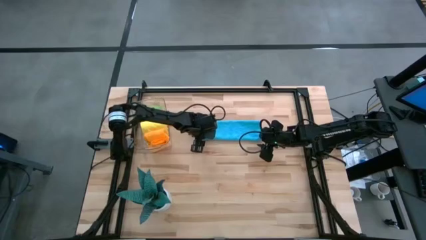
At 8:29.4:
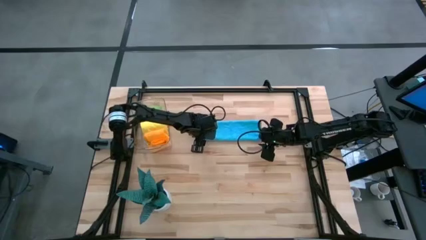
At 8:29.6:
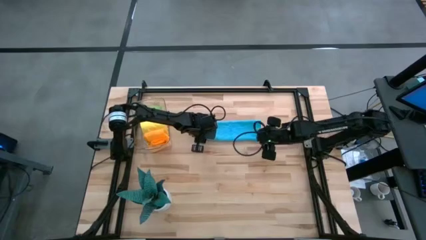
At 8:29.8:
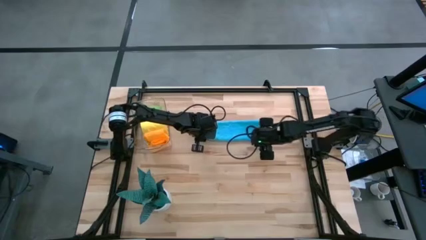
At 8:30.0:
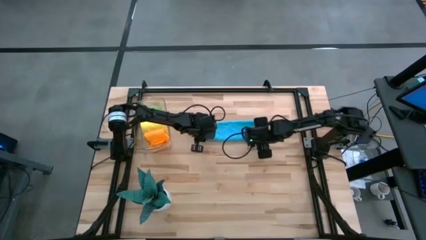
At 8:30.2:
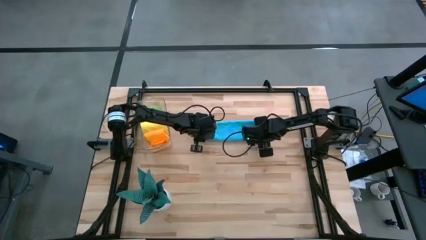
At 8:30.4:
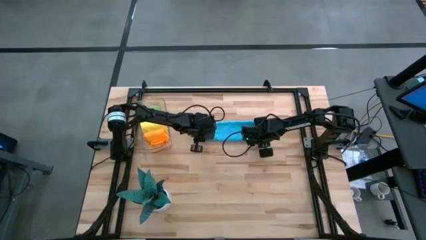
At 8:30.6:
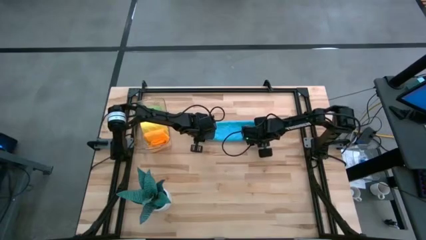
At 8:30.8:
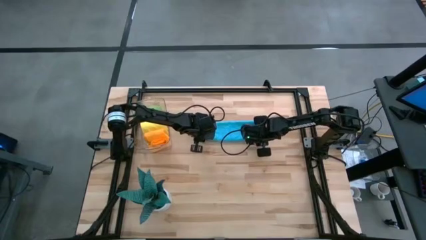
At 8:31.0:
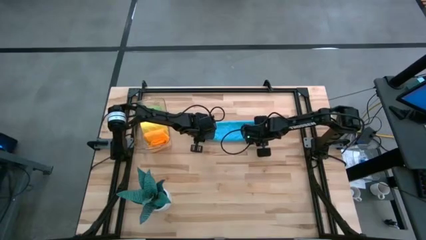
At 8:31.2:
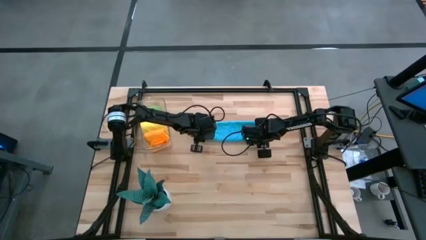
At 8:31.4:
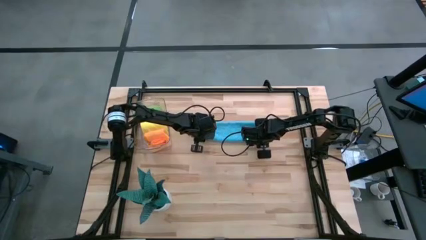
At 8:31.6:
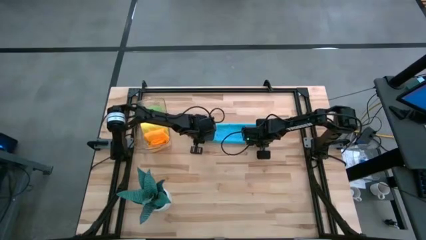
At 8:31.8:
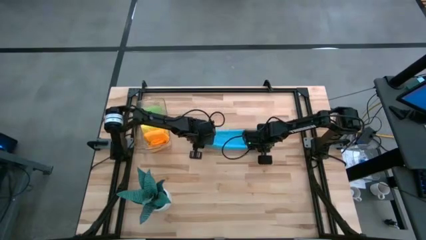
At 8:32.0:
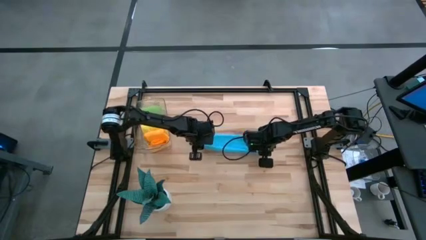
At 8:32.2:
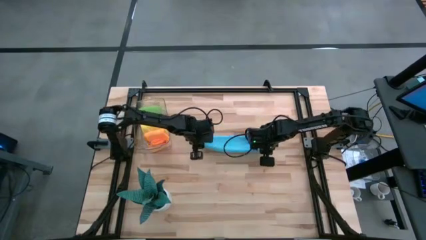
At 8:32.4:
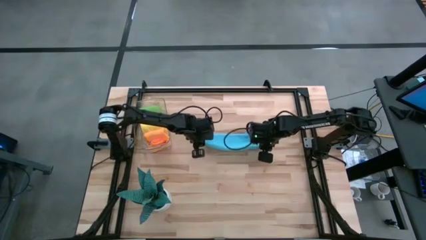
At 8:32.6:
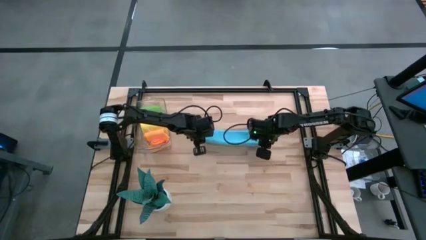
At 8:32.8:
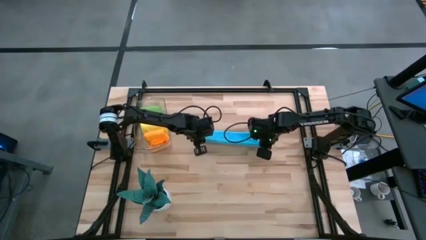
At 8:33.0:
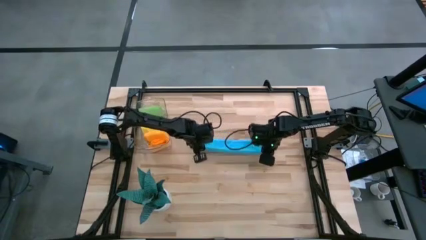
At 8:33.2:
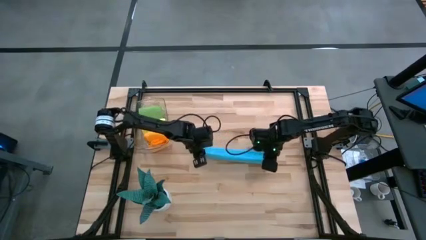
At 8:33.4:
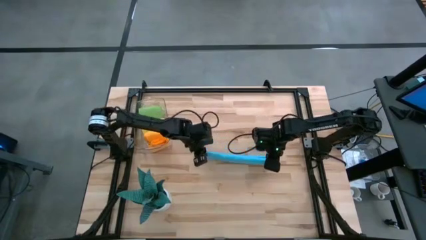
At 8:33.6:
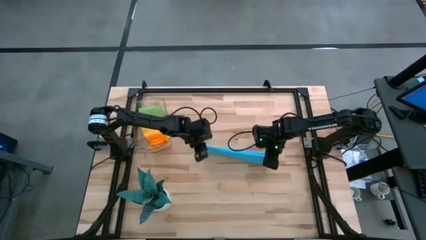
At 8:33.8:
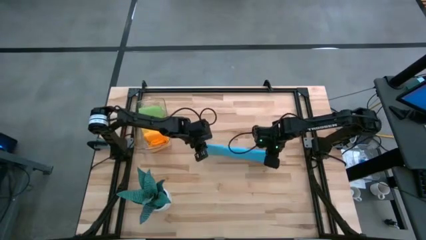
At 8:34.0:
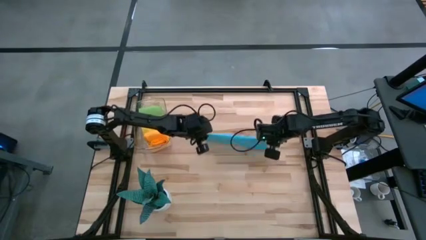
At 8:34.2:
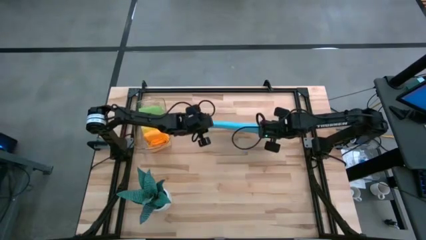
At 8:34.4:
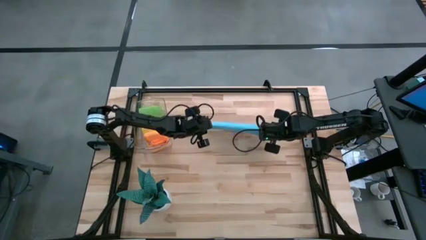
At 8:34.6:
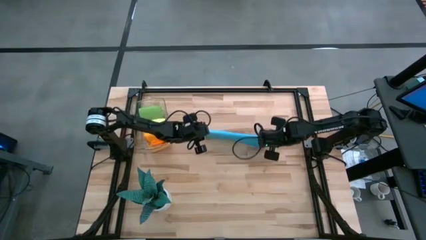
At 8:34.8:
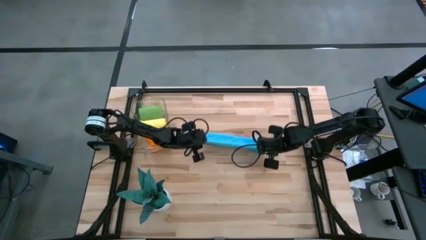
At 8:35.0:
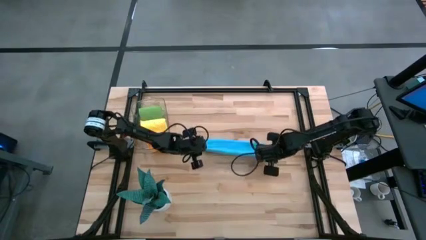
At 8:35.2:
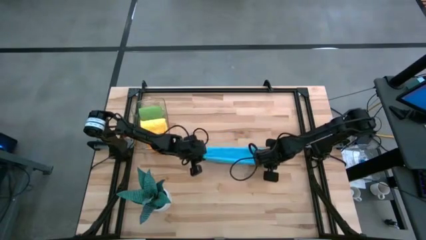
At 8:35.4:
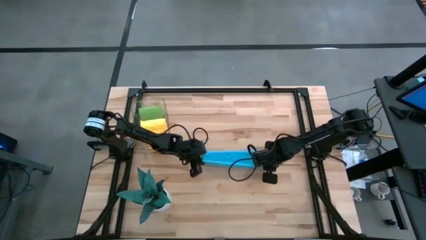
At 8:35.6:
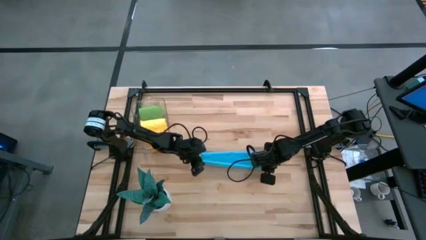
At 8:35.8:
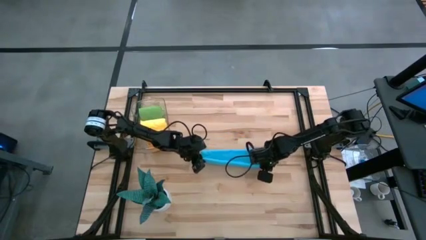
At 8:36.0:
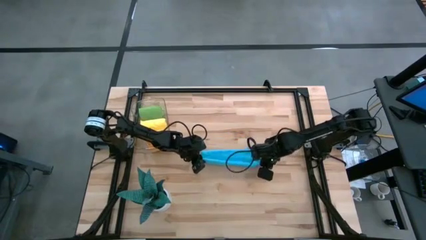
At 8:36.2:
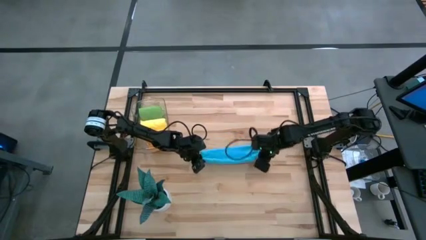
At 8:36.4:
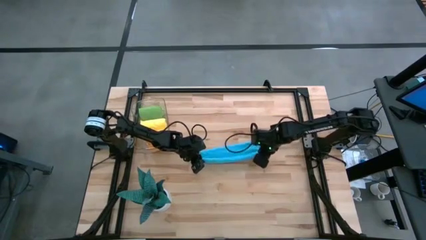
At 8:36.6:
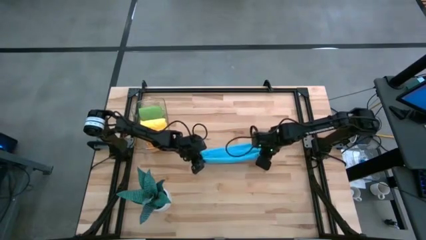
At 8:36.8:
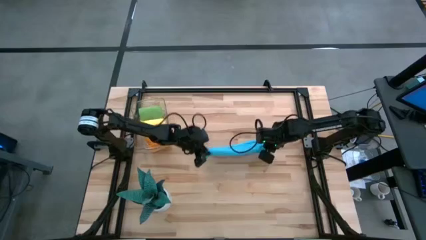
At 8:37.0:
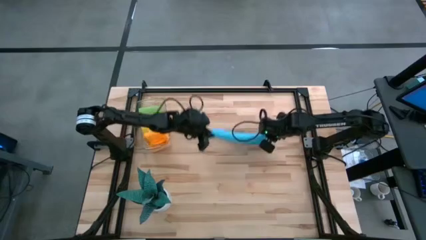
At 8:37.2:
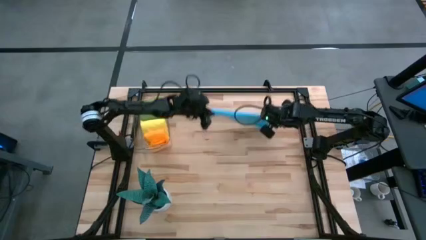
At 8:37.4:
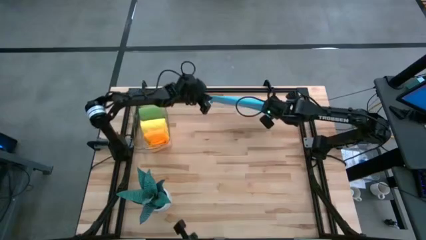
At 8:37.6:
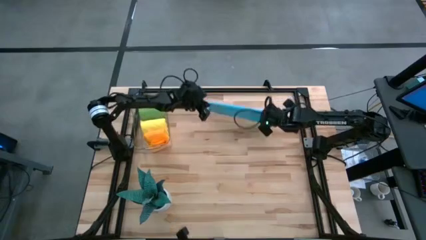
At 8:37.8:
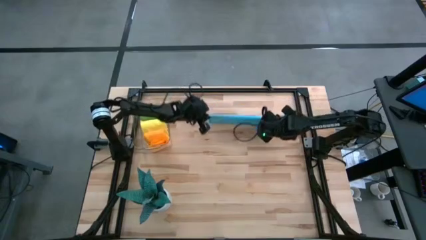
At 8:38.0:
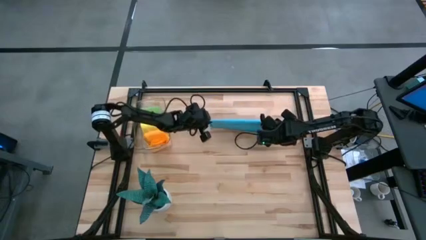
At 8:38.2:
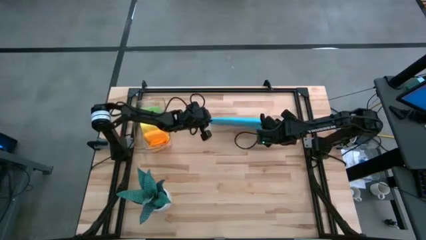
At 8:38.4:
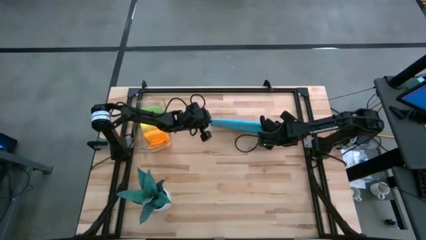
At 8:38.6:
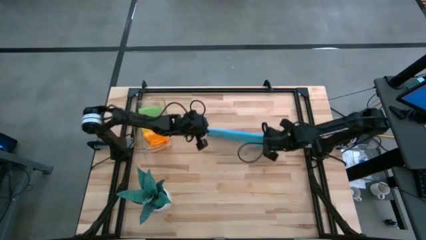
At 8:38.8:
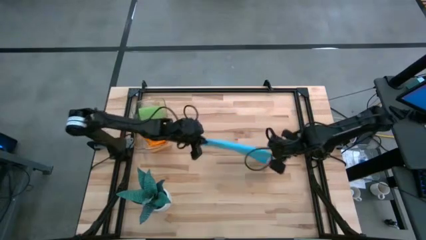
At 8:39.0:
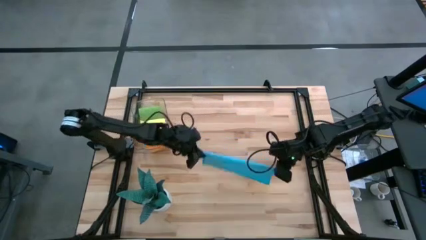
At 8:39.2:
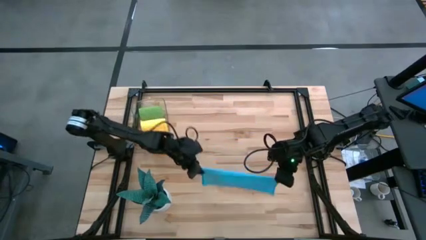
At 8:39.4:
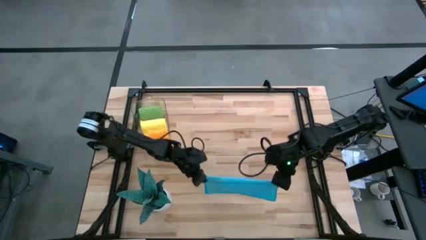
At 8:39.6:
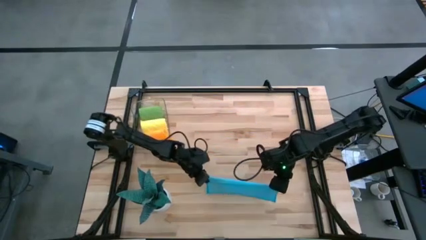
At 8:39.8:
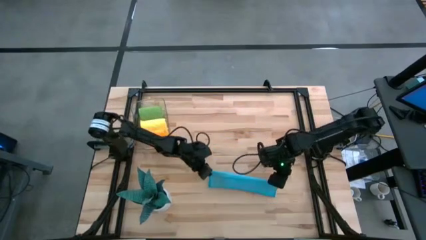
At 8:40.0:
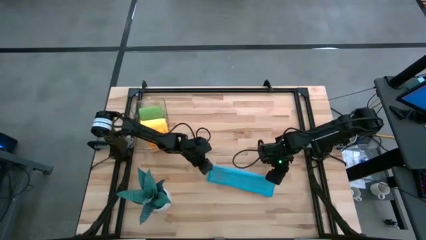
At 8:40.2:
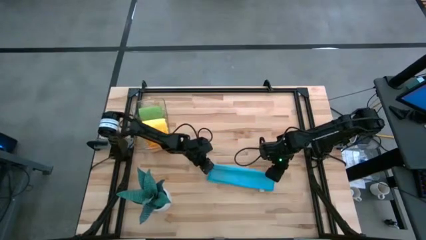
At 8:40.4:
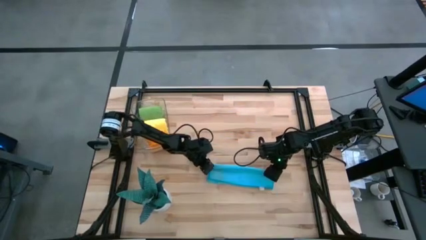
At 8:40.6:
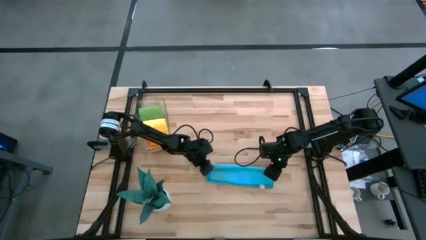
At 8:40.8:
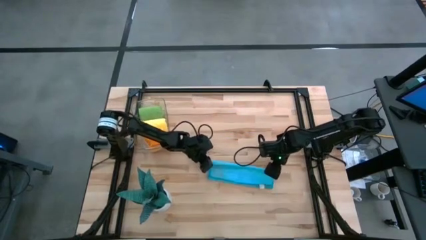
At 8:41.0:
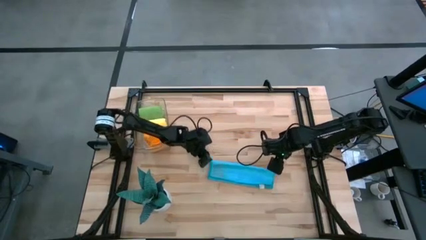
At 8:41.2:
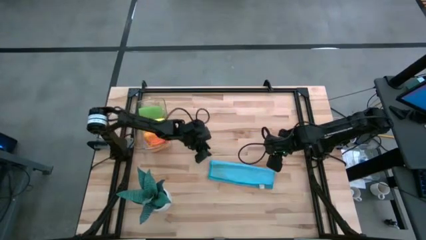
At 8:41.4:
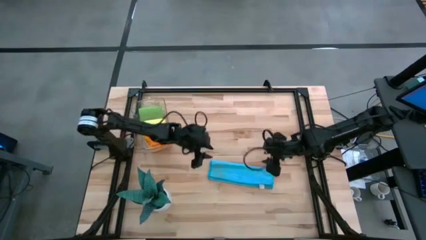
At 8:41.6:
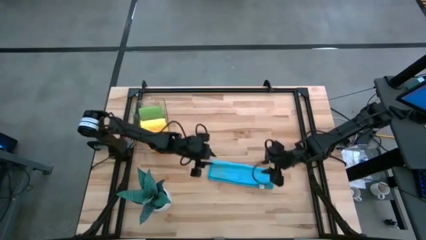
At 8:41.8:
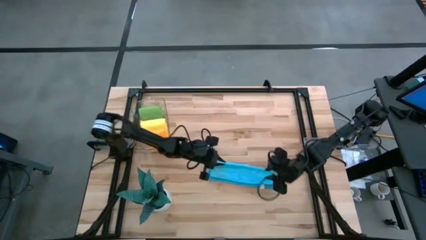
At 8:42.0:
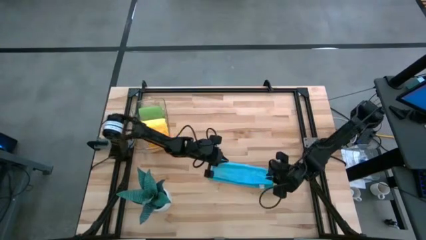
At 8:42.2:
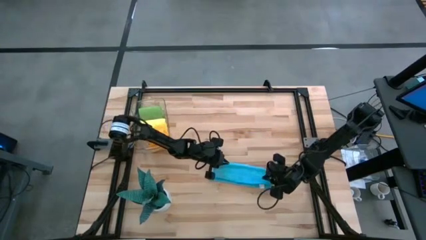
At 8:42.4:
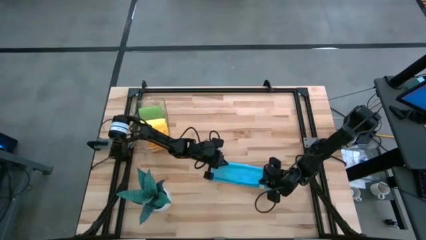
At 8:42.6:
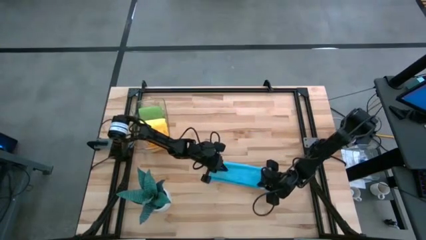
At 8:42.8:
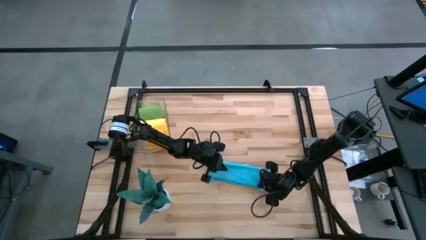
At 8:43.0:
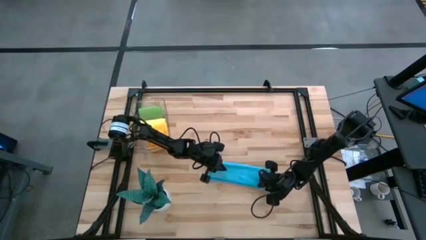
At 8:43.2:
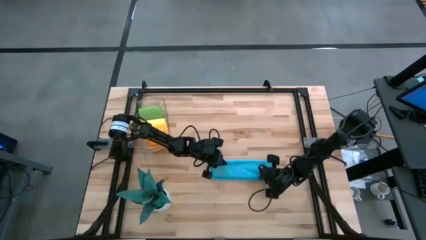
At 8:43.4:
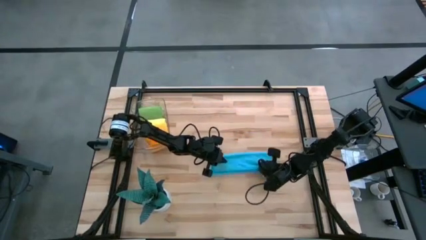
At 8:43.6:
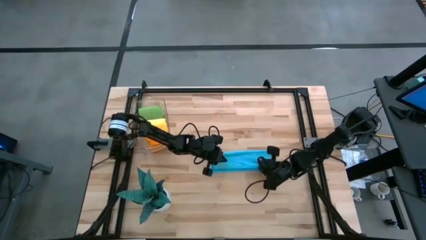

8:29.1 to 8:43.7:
Task: Roll microfiber towels into tight, uniform cylinder then place into a basket
Fold the blue microfiber towel

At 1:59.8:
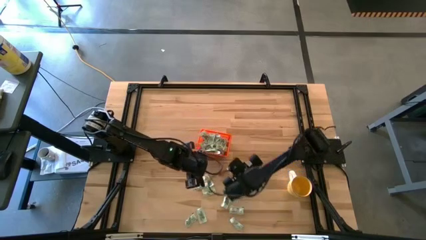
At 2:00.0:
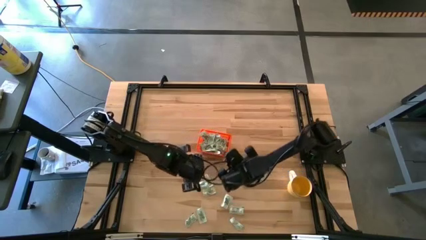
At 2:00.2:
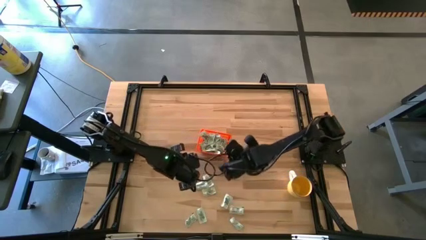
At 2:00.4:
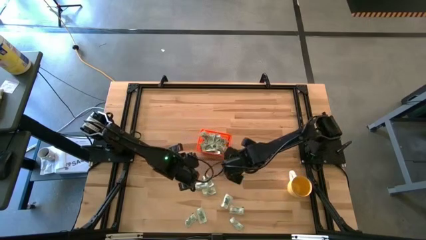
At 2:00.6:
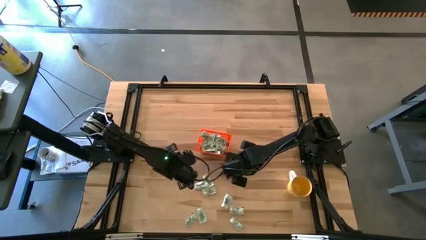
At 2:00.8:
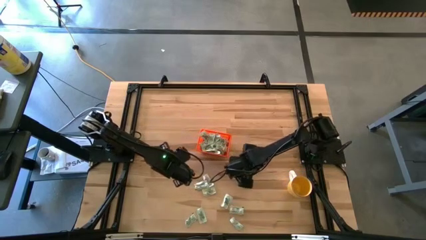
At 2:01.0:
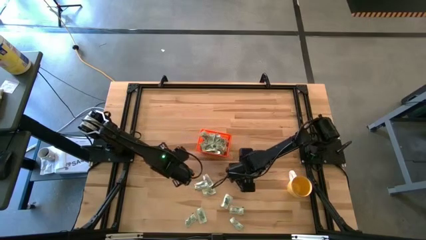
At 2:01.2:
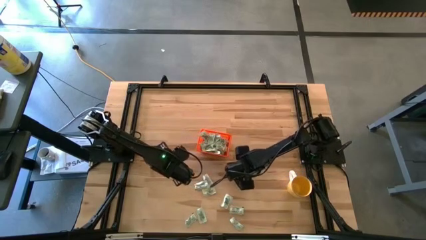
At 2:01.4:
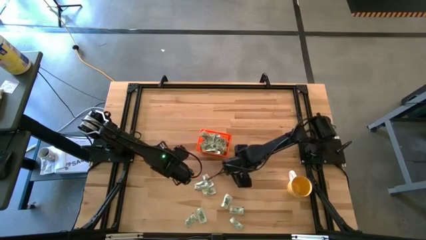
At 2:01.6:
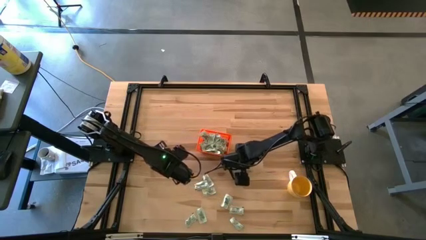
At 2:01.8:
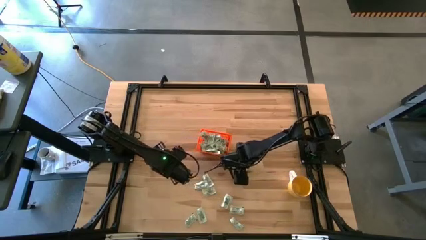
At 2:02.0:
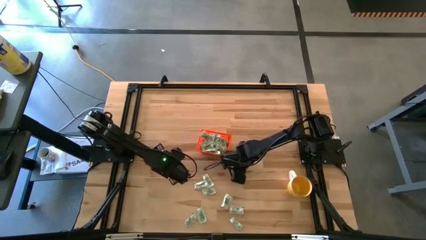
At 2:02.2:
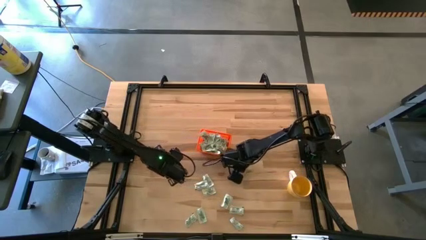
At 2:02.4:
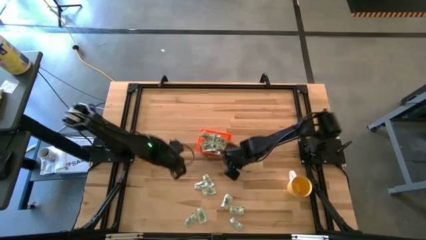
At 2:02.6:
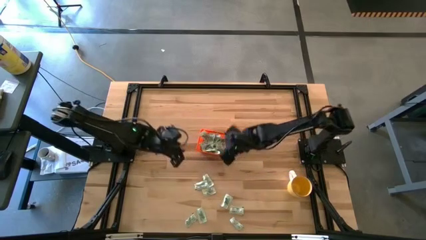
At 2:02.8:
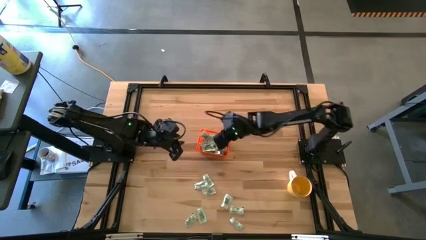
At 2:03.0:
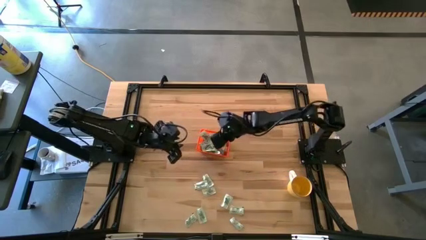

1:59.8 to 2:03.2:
Task: Pick and place Stevia / Truvia into bins
Put the light green stevia packet into the orange bin
